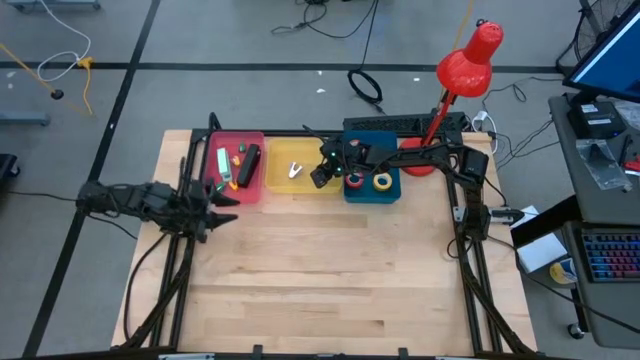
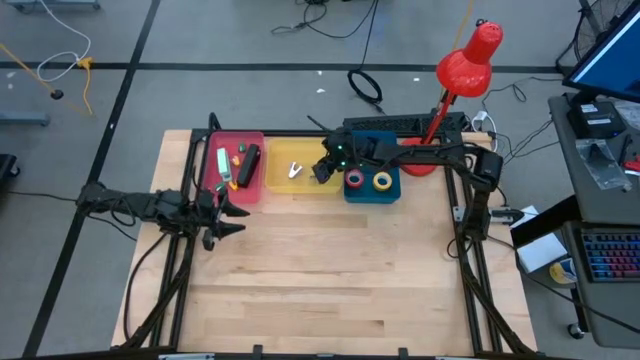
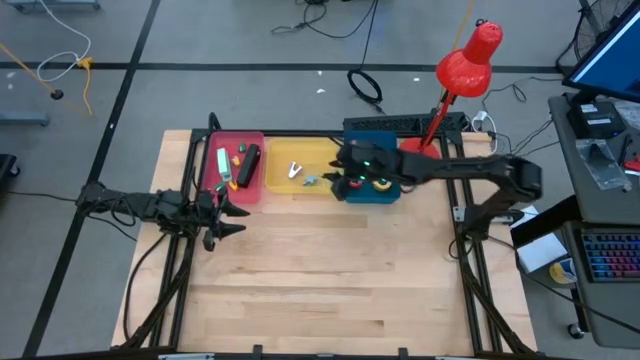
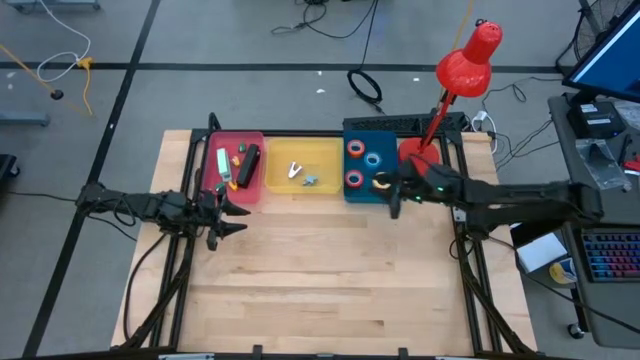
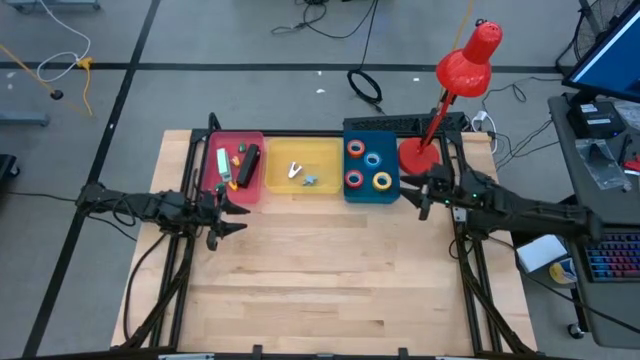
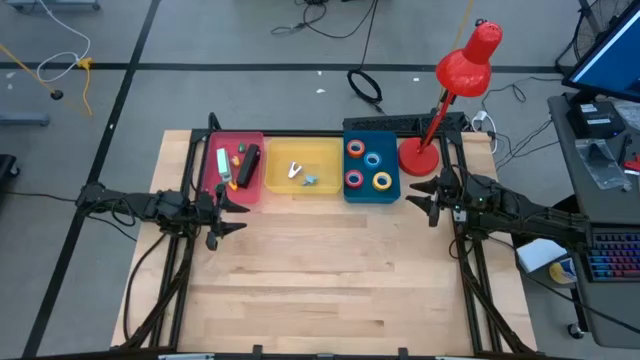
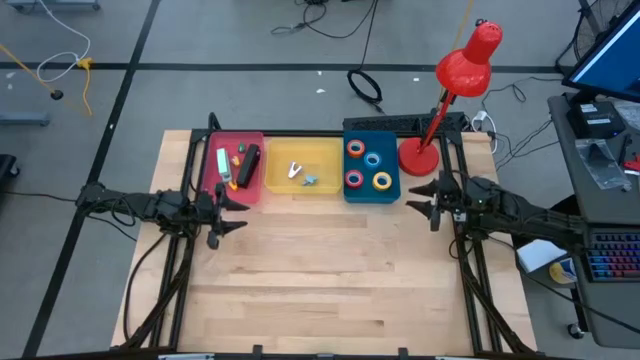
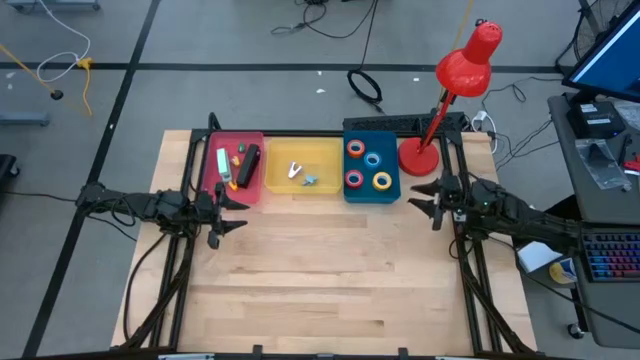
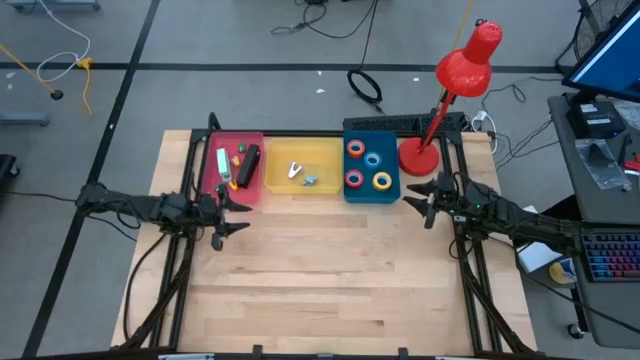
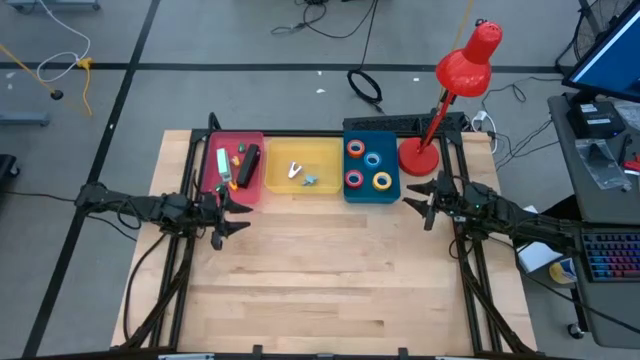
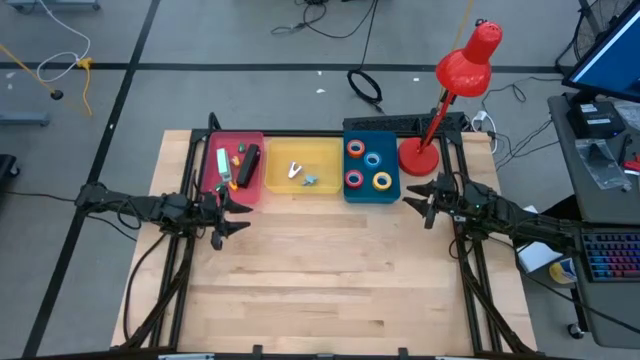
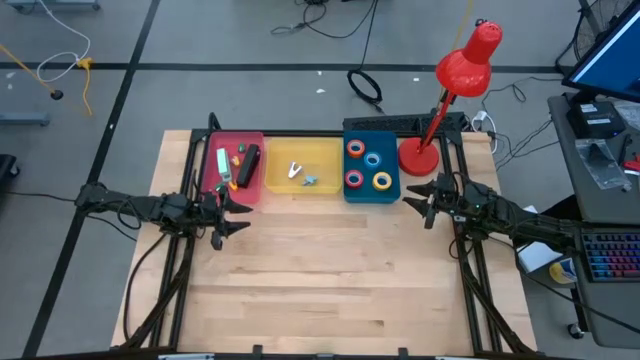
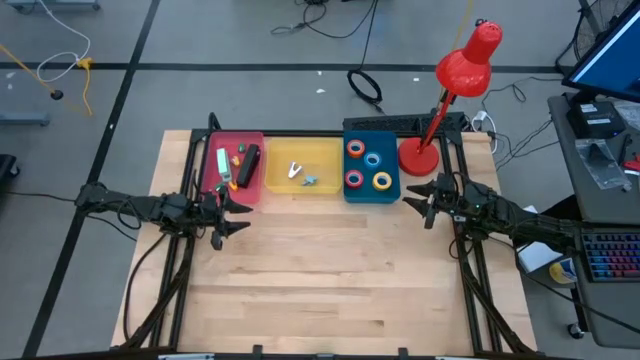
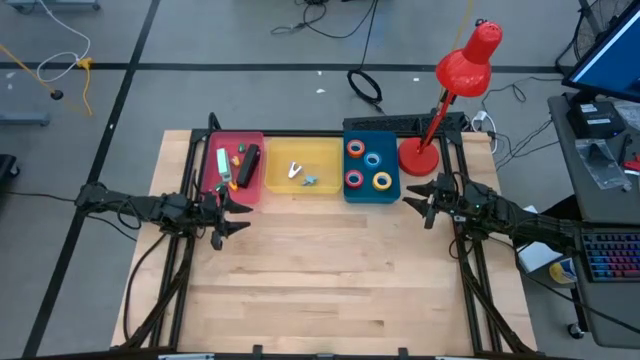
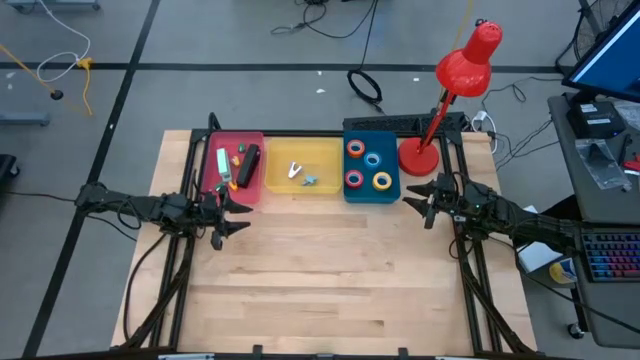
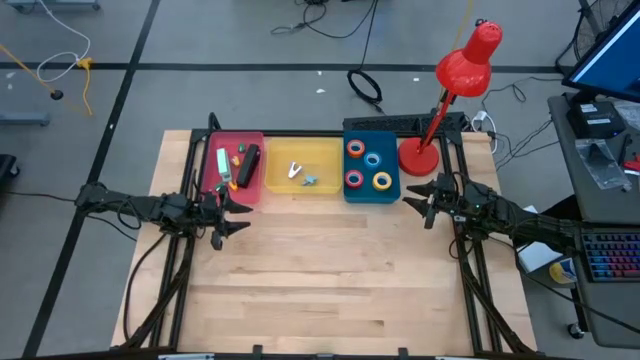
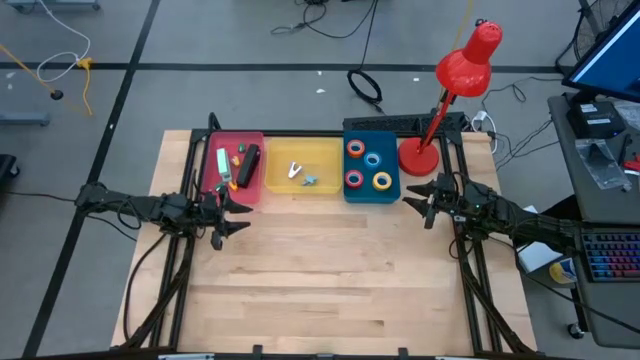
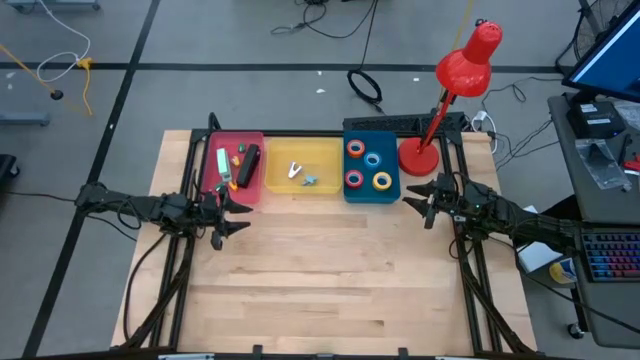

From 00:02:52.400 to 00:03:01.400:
Task: Pick and place Stapler, Stapler remover, tape
Return to Home Position

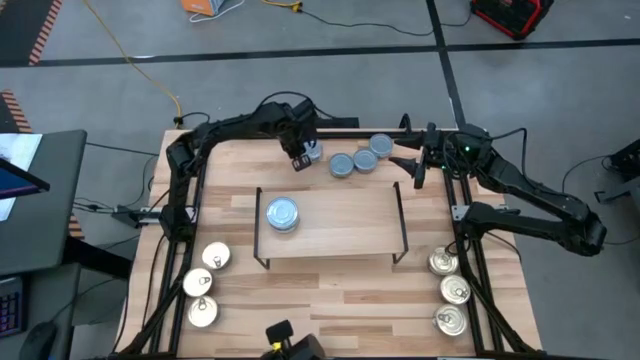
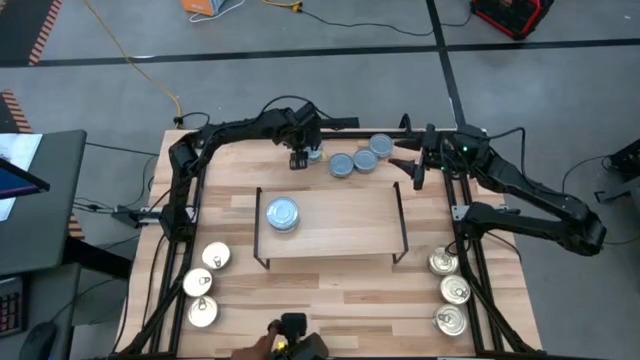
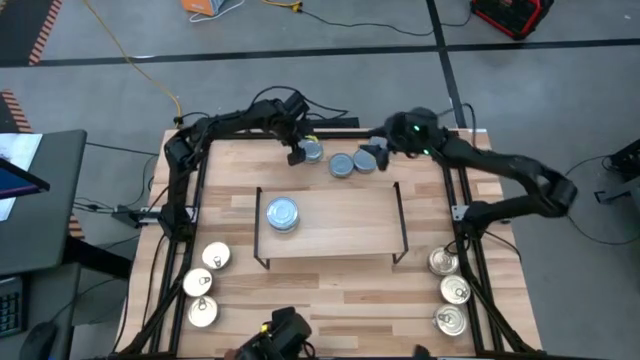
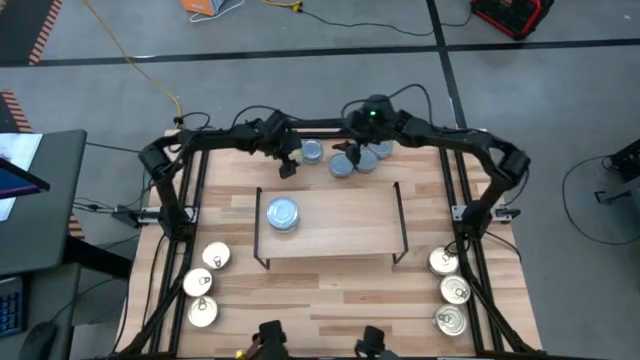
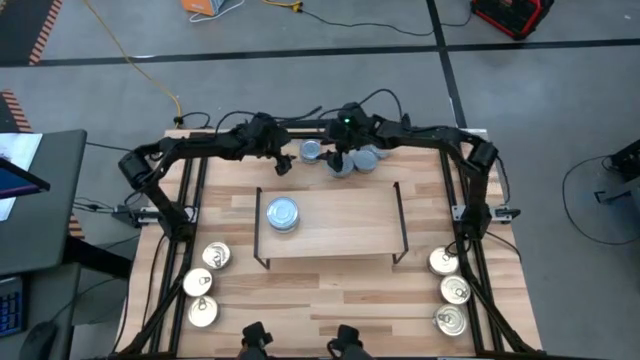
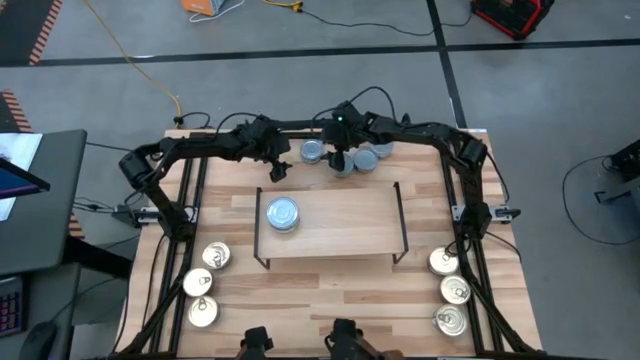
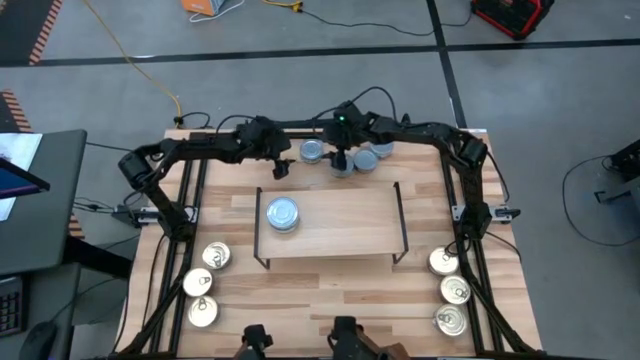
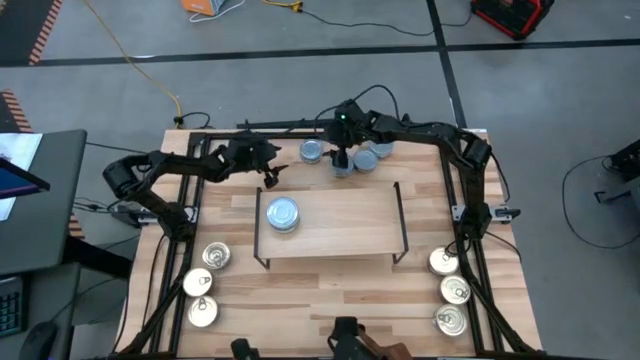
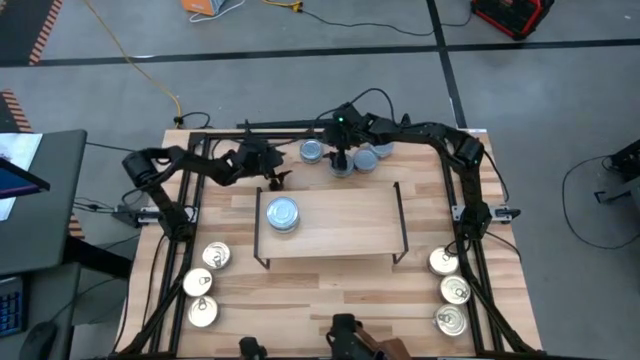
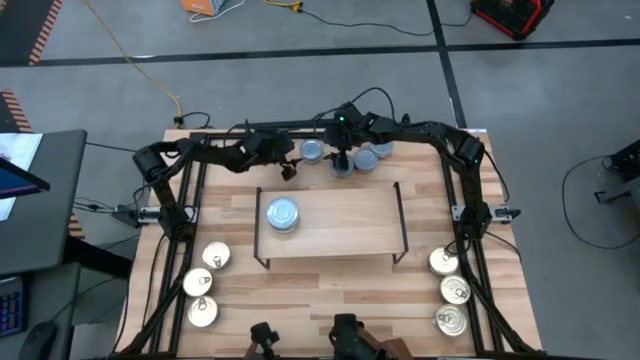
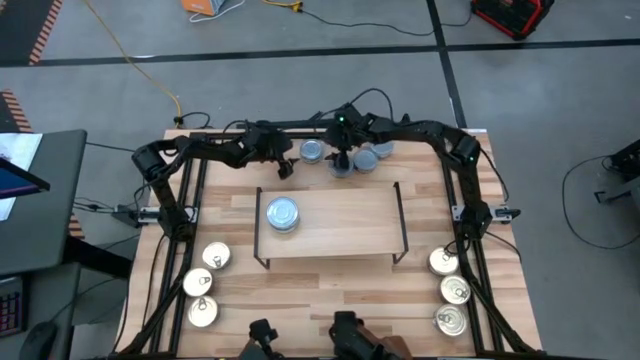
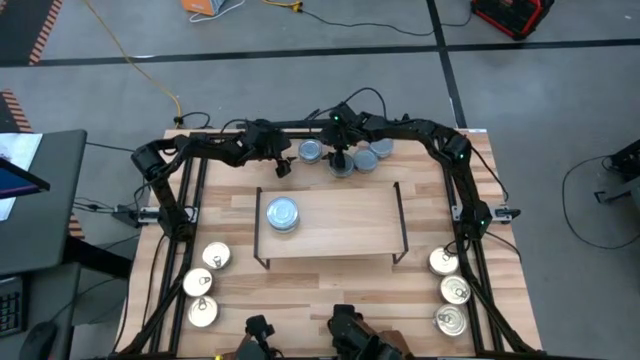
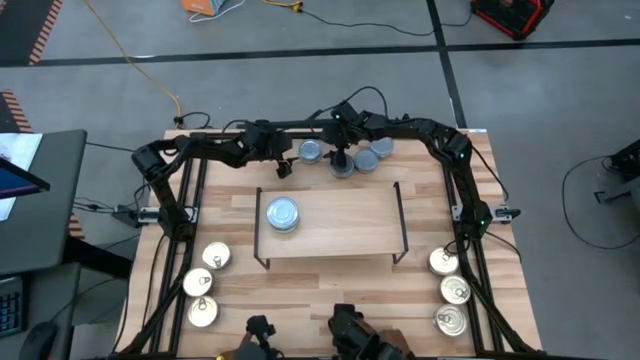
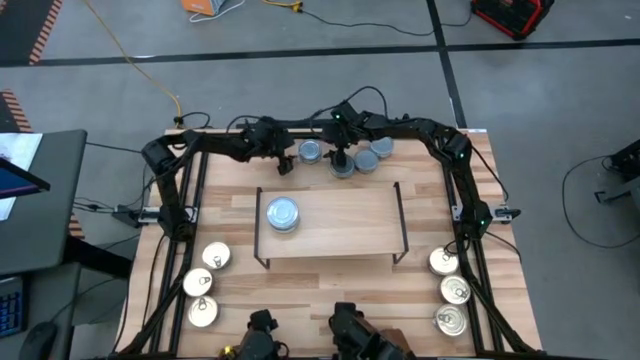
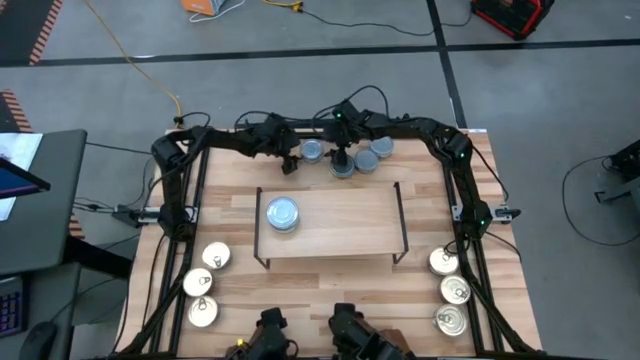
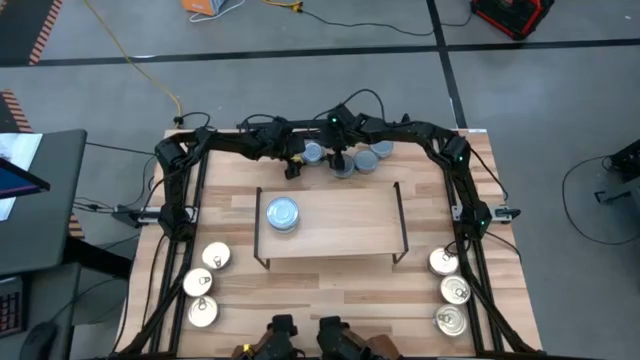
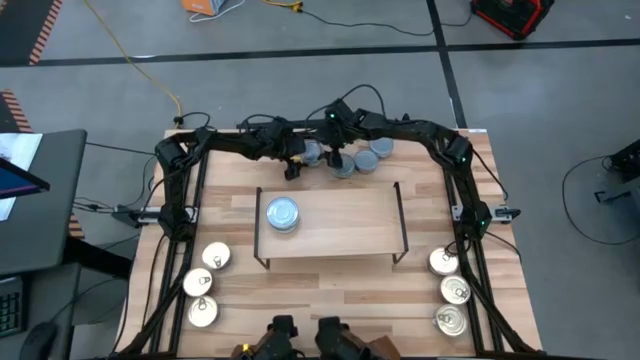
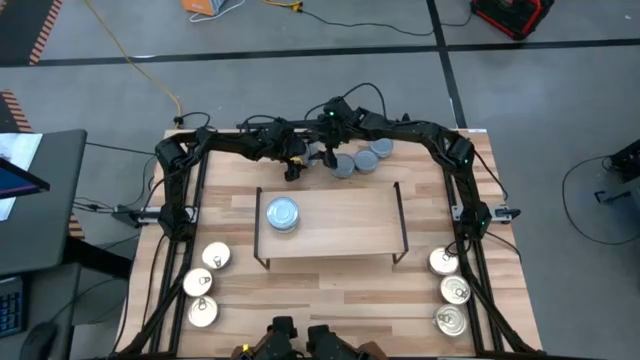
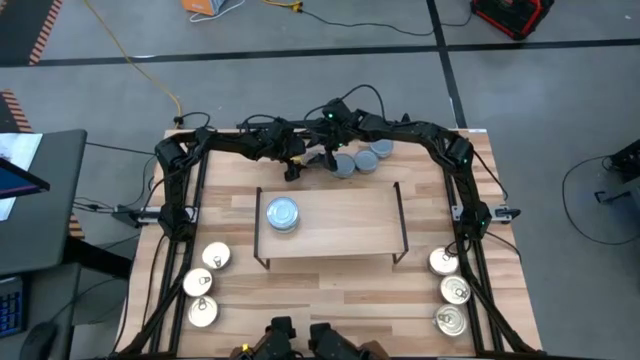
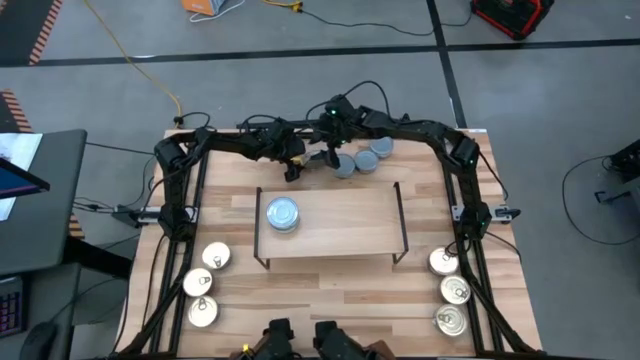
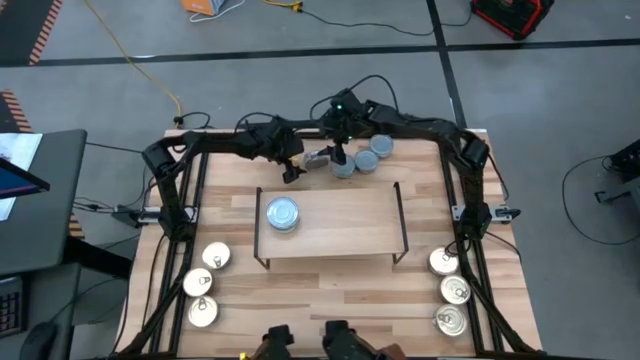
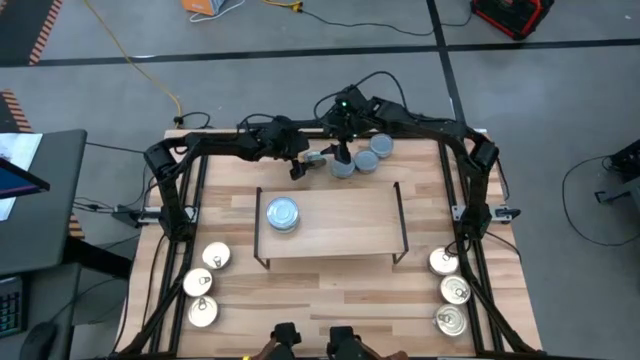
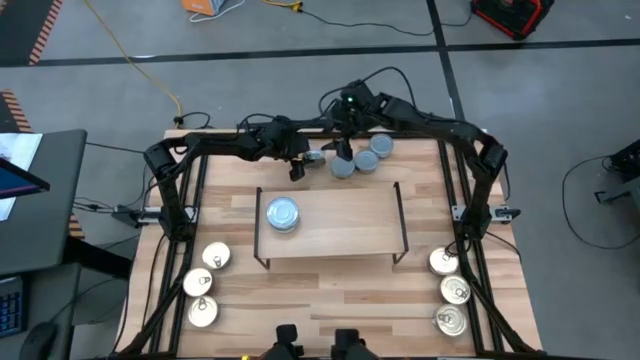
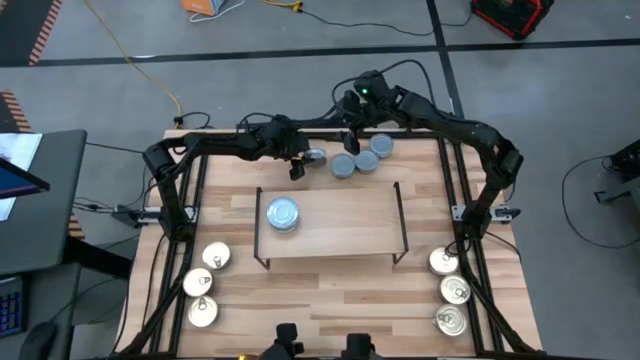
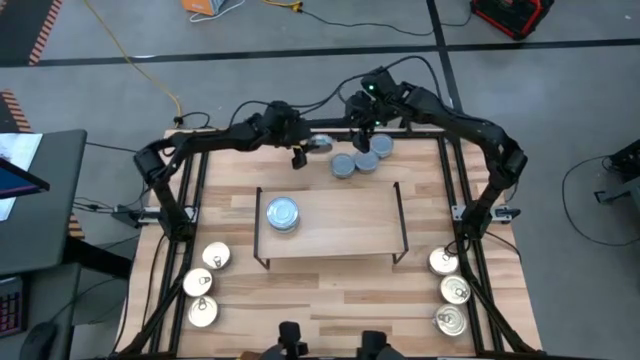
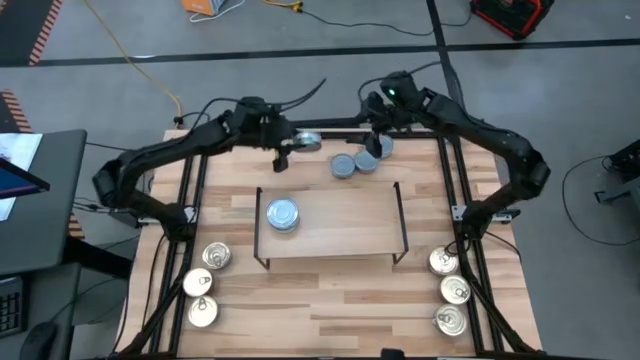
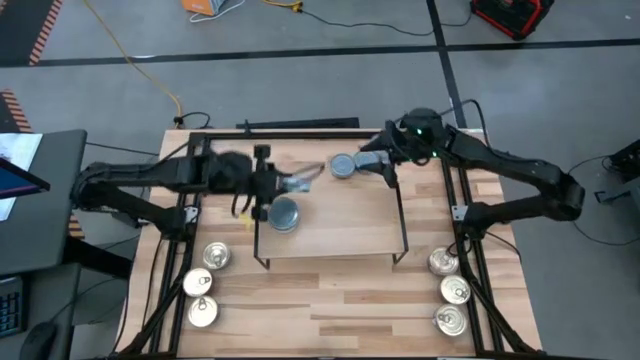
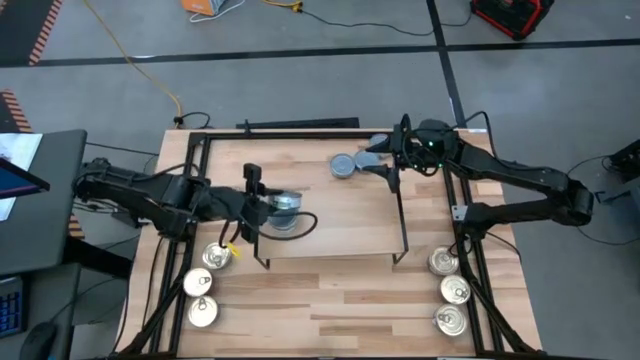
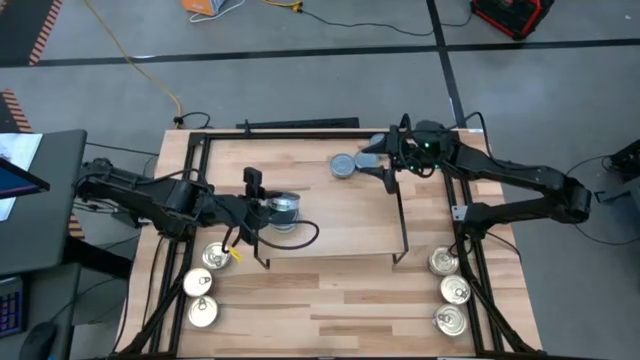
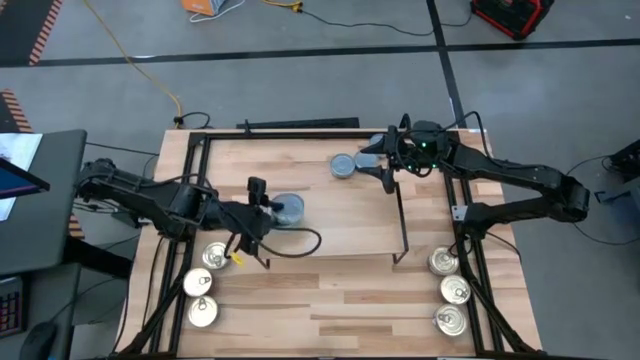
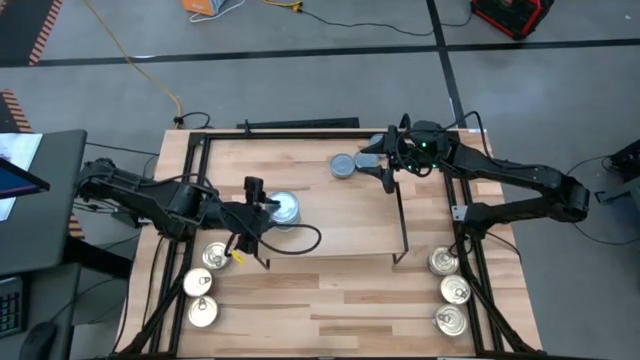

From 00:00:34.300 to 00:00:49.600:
Task: Stack canned seafood by type on shelf
Stack the green tuna can on top of the green tuna can on the shelf
